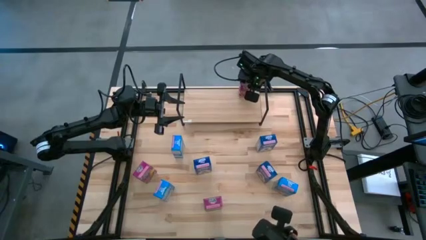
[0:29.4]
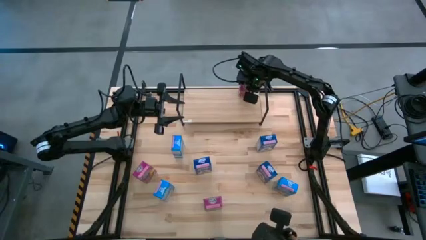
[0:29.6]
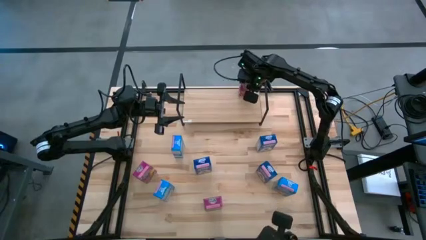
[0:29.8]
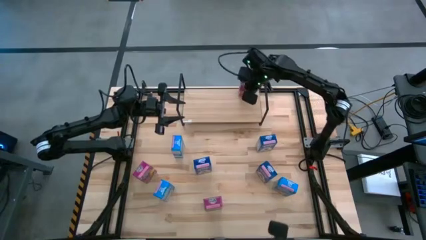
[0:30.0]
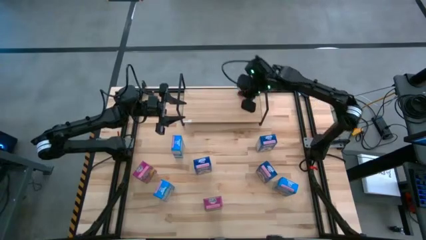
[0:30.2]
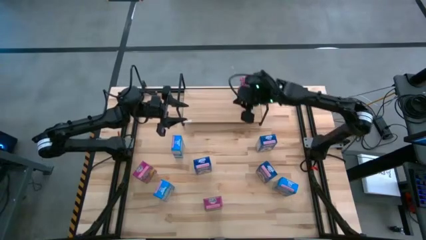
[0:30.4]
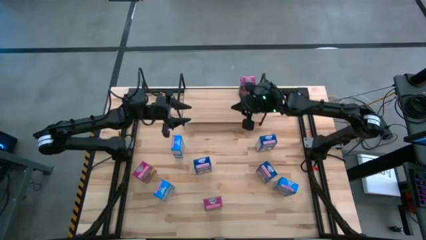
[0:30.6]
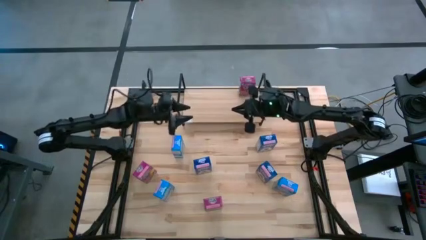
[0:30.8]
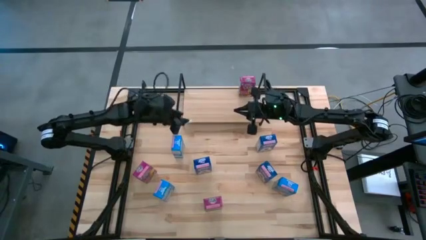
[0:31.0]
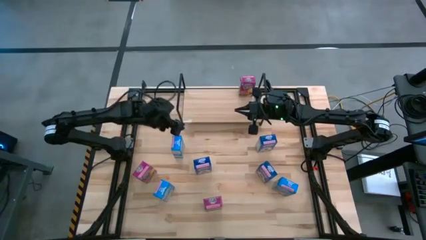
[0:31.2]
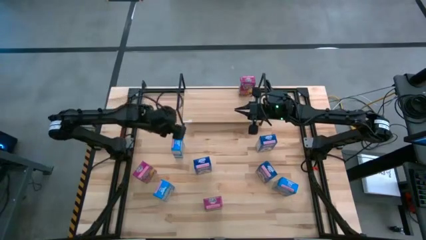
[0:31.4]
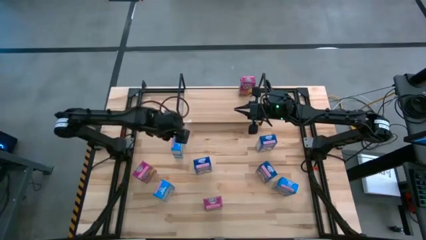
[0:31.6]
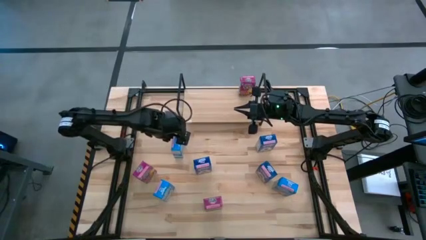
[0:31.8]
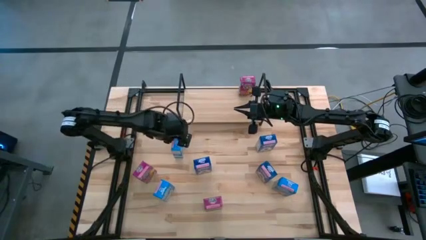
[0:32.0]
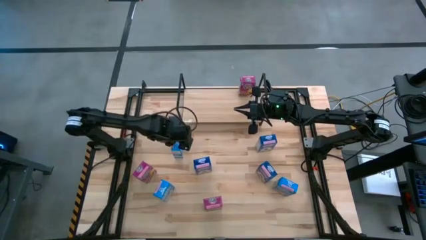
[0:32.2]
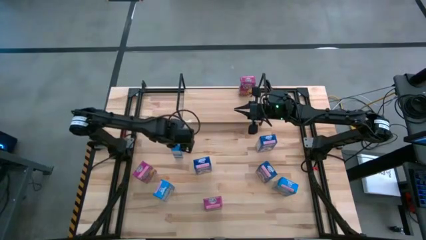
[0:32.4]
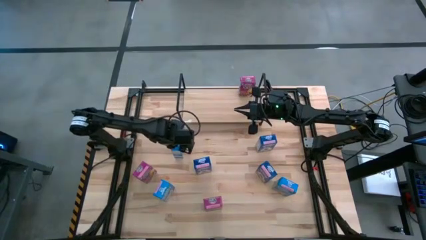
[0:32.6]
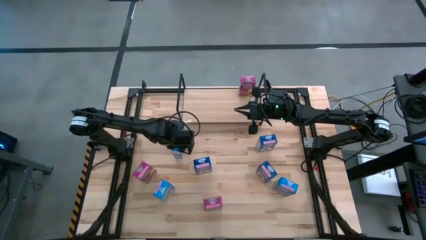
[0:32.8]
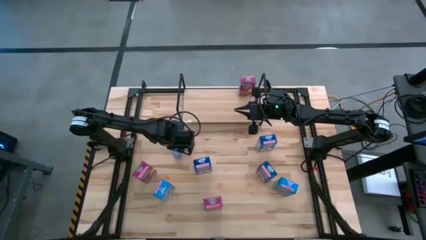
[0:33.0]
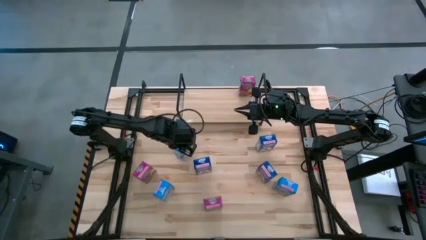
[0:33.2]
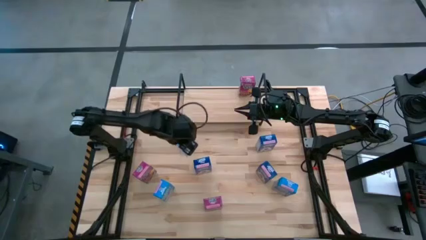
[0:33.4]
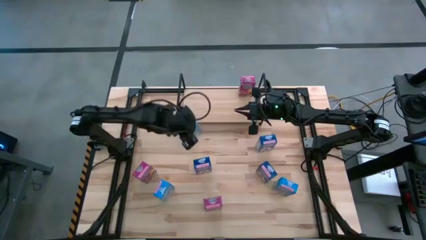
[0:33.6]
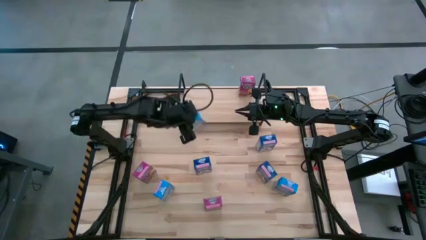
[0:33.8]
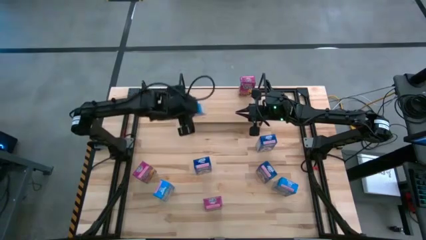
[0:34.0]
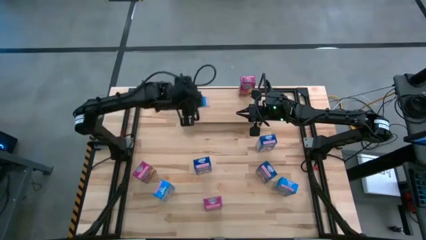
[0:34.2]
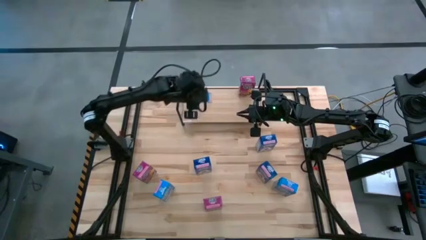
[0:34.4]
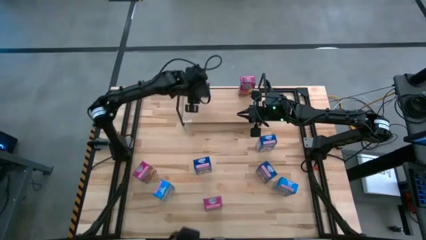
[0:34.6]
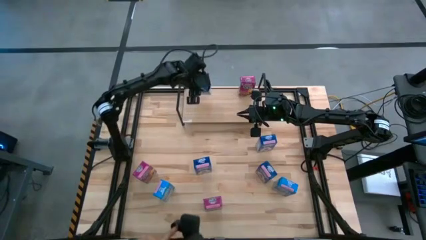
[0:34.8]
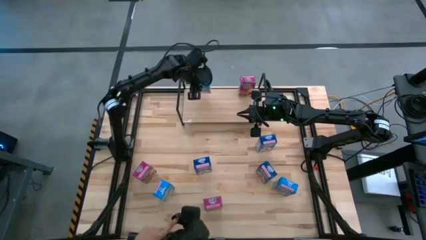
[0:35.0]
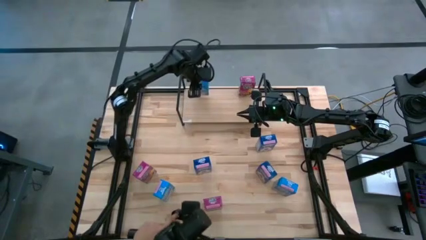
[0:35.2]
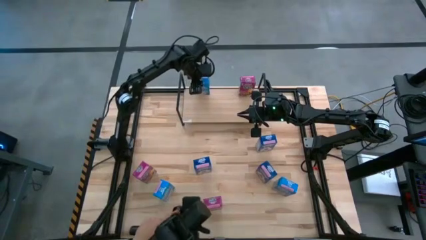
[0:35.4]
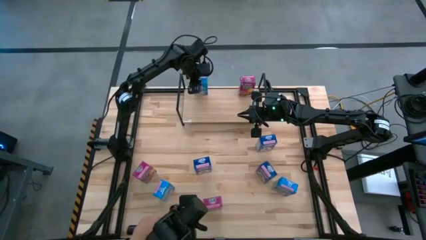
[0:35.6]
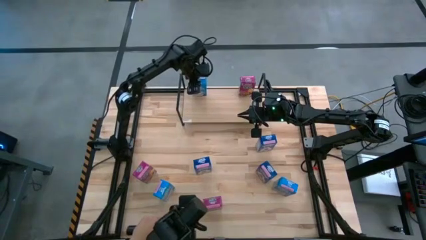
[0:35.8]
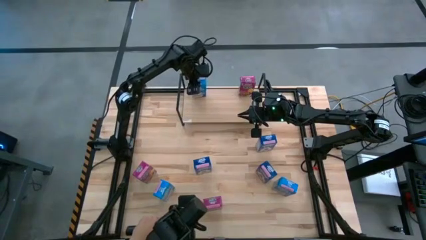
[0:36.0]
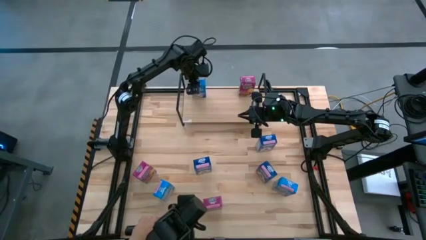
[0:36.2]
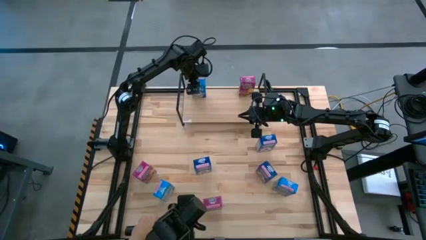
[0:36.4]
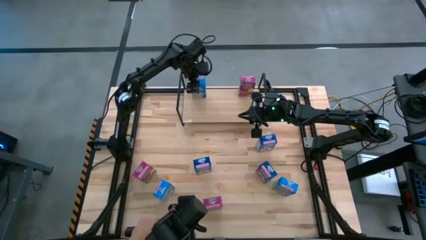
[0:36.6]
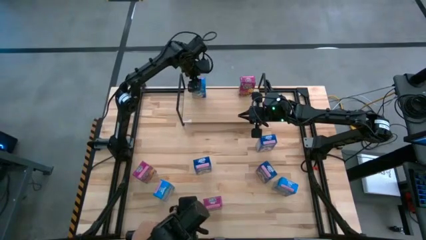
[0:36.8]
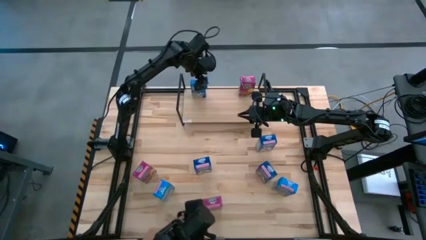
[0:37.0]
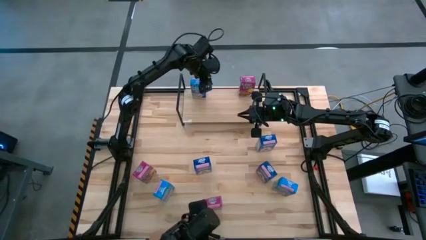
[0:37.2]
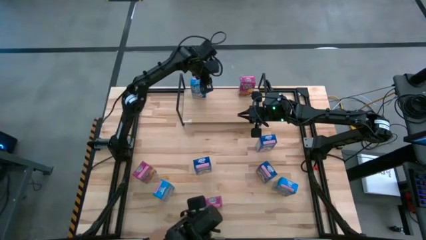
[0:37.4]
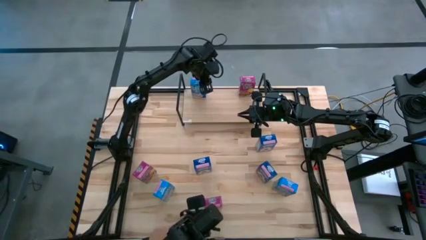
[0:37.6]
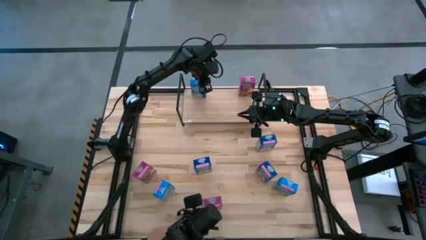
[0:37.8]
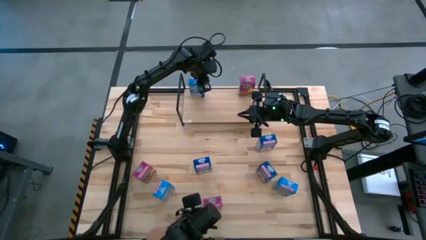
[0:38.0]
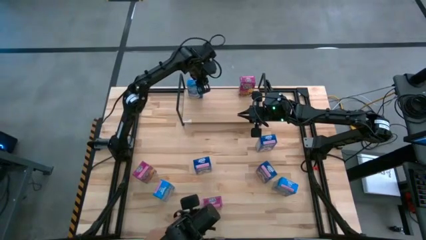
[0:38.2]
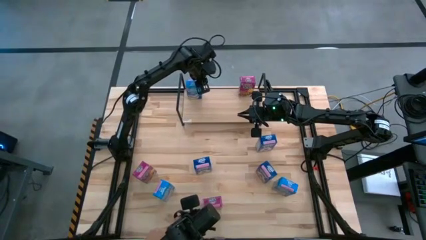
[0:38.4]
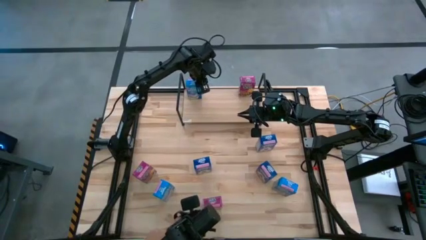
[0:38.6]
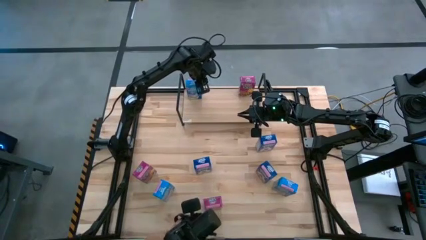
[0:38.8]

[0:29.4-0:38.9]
Task: Stack cereal on shelf
Put the top blue cereal box on the shelf

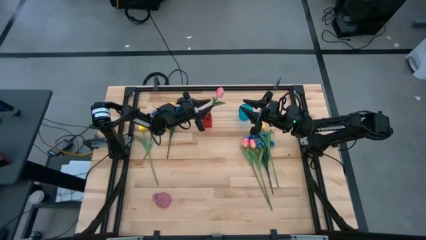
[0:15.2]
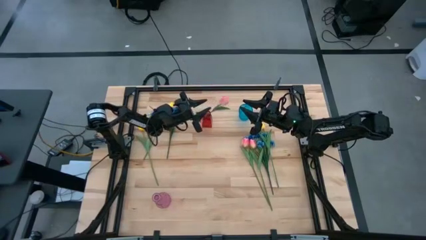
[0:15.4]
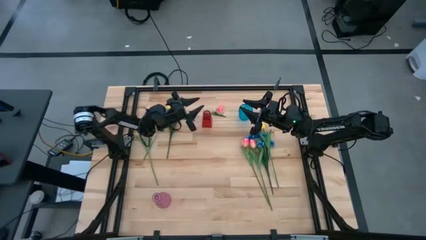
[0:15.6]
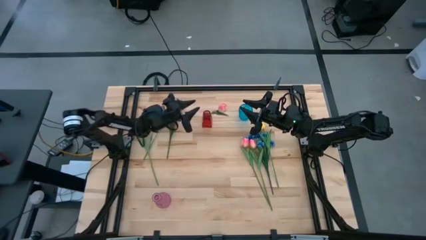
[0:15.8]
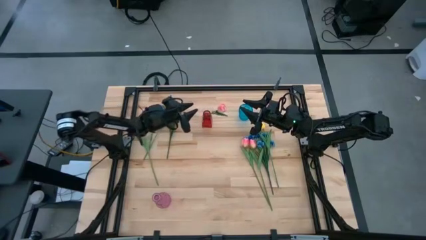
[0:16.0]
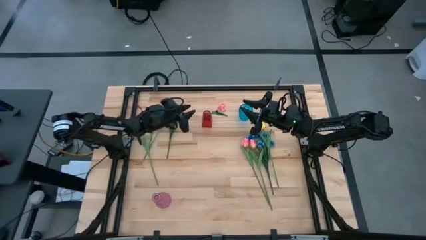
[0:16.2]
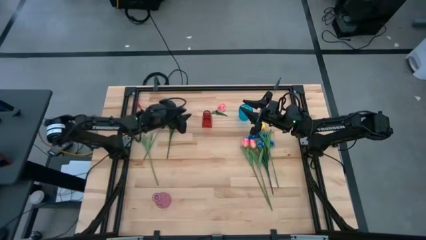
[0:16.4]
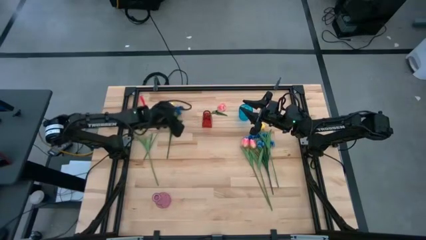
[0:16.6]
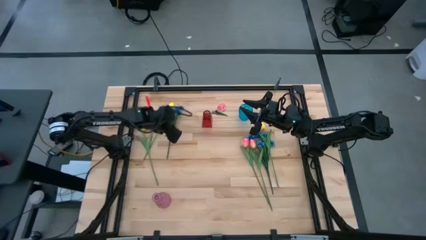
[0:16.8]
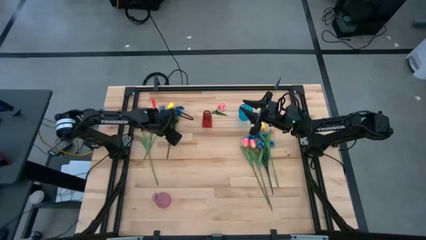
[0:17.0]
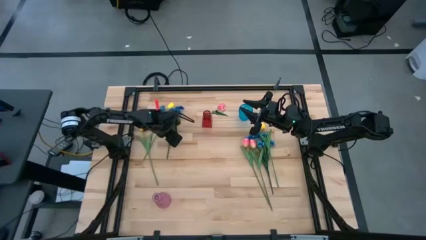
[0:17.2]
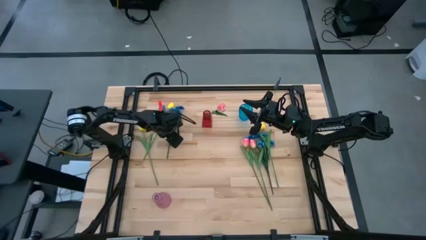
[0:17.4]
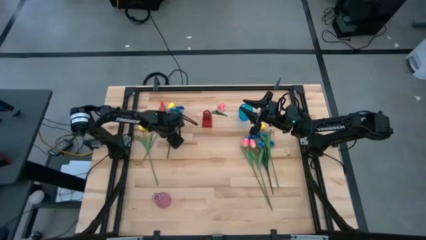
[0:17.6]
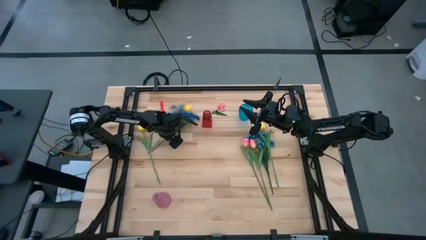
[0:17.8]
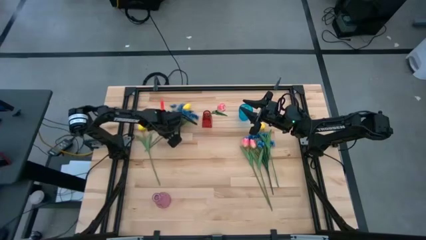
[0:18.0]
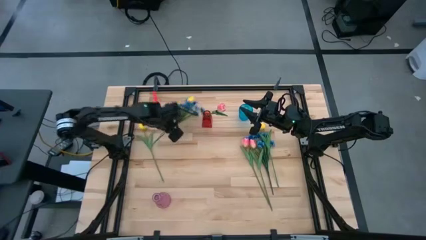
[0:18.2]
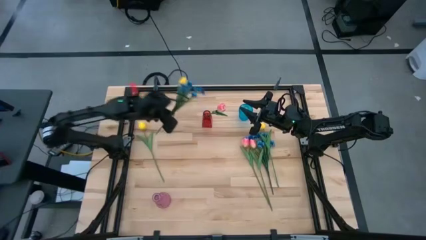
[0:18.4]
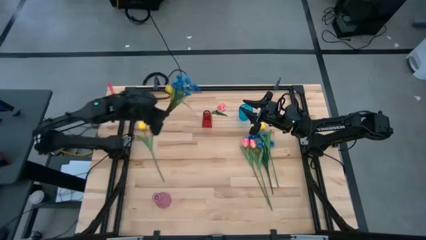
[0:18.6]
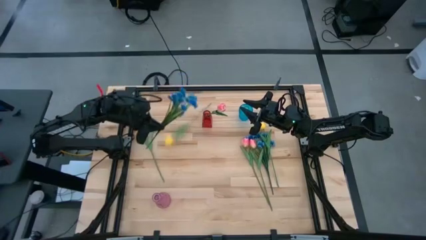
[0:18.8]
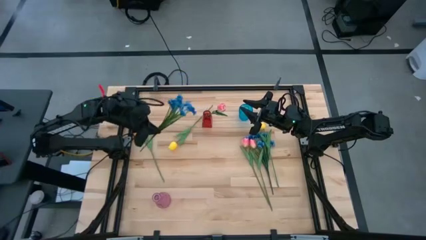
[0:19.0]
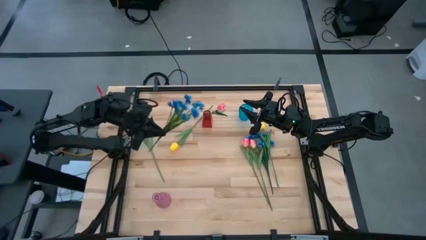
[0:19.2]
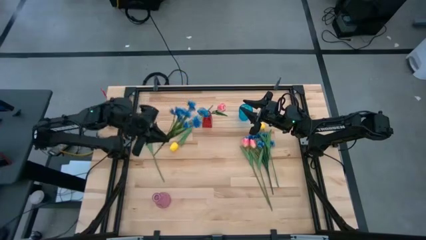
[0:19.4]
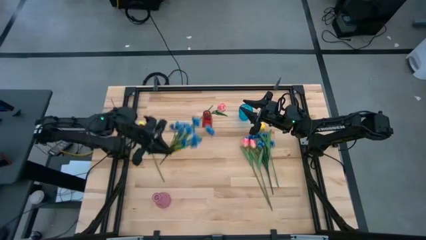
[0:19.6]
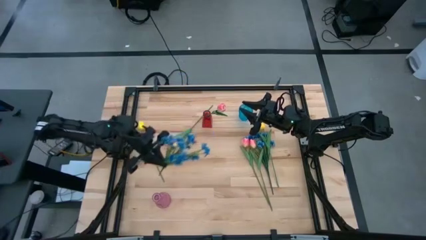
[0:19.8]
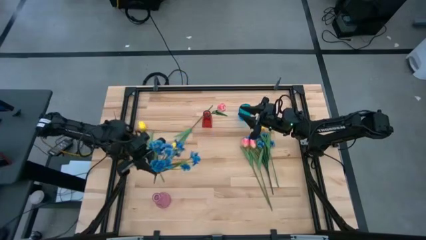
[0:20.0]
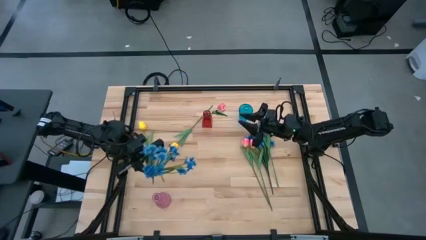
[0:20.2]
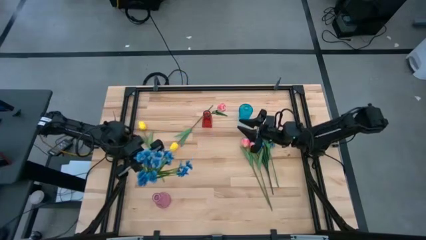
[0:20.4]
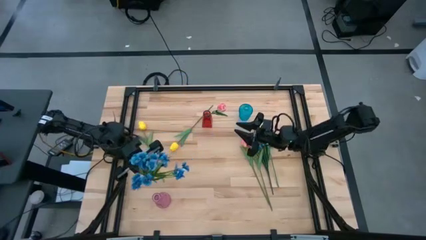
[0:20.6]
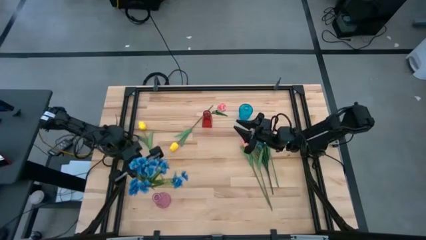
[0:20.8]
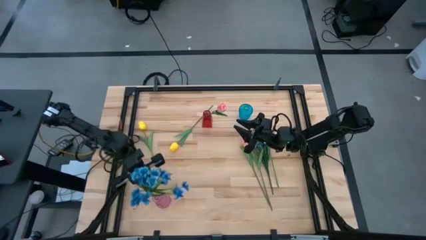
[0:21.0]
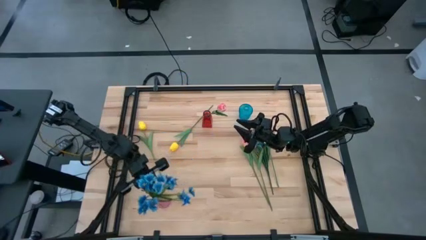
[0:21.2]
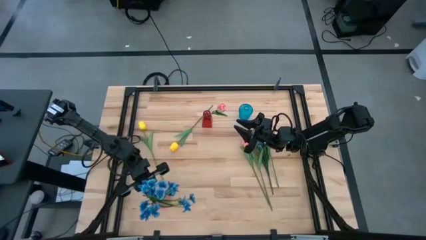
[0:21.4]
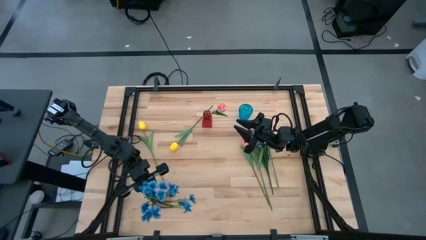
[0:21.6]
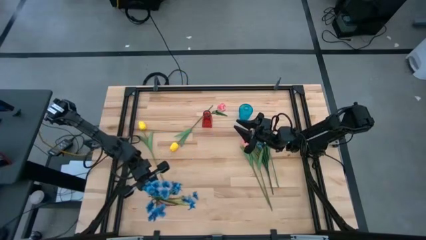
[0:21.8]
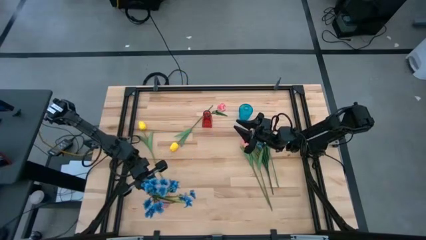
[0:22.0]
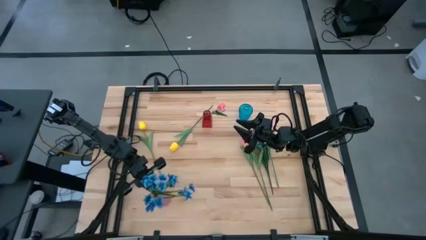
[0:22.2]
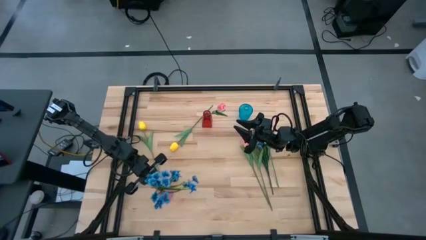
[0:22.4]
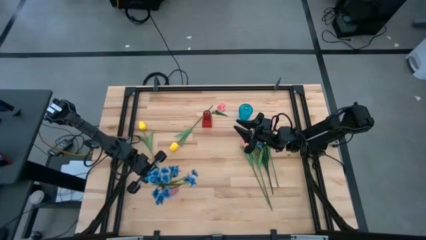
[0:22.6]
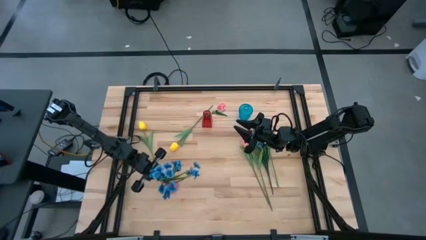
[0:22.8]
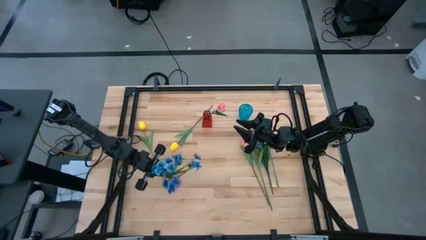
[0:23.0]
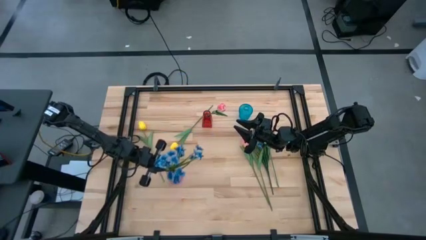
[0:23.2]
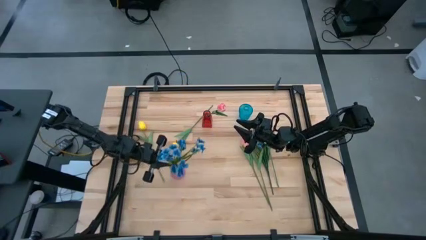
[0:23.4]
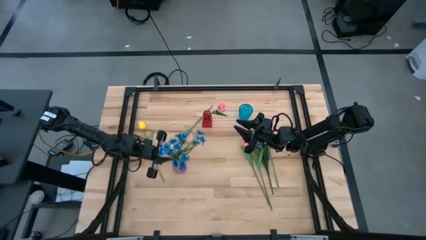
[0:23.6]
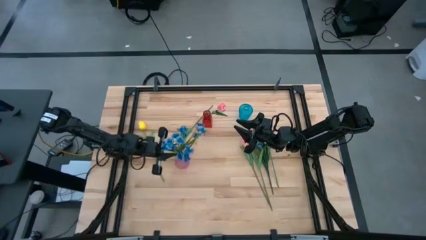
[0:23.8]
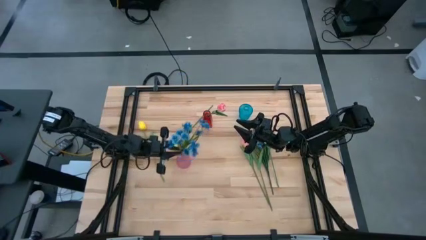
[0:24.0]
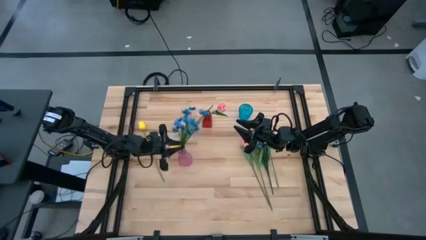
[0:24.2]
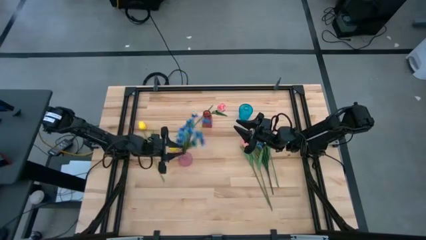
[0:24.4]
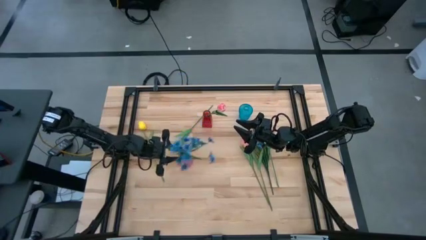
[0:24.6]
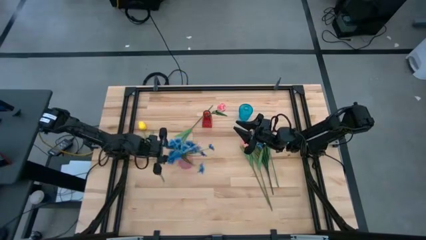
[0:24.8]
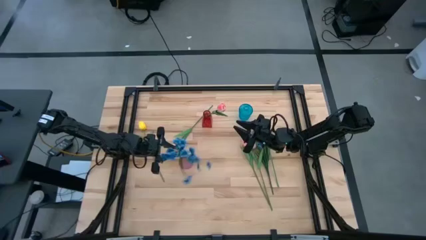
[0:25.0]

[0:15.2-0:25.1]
Task: Sort flowers into vase by color
Put the blue flowers into the pink vase
